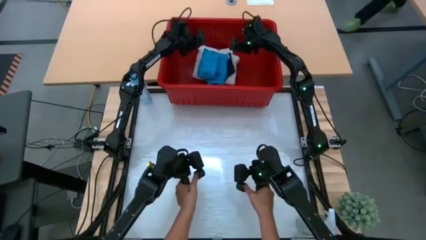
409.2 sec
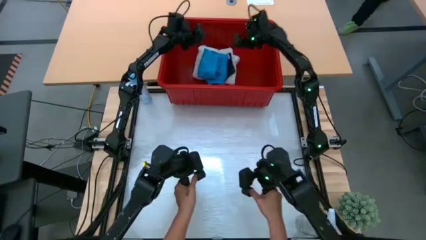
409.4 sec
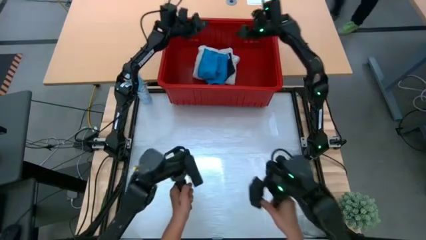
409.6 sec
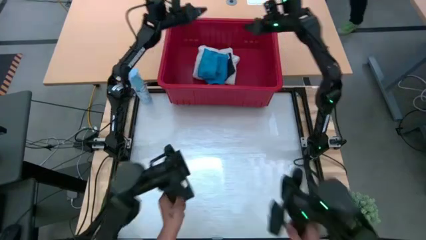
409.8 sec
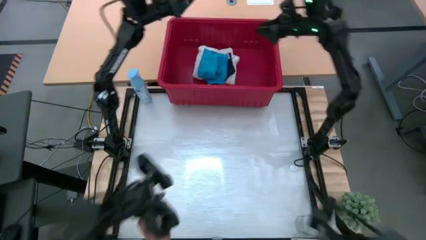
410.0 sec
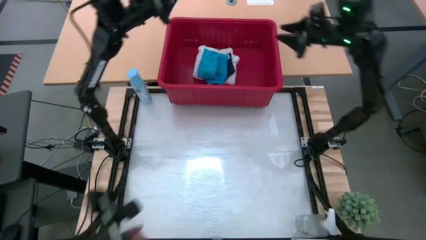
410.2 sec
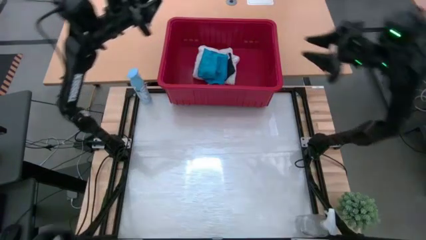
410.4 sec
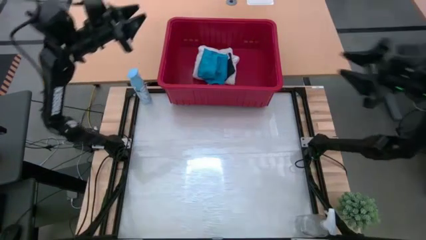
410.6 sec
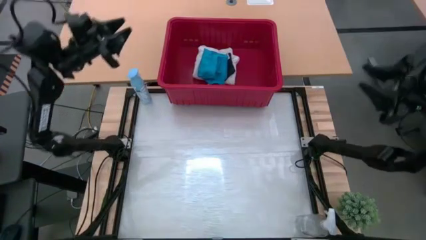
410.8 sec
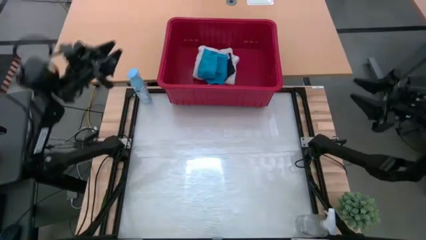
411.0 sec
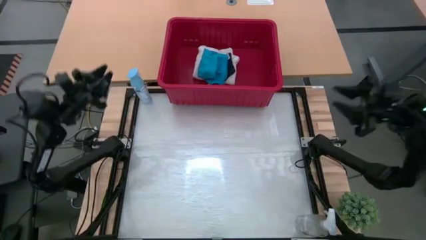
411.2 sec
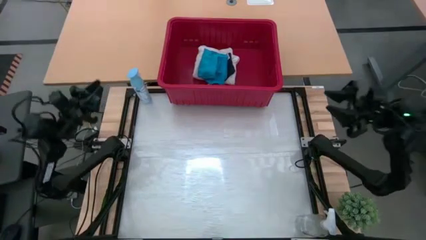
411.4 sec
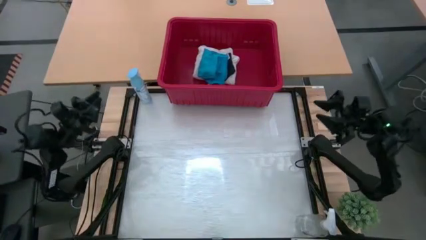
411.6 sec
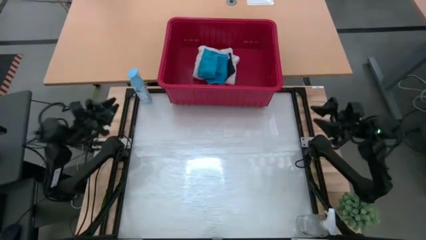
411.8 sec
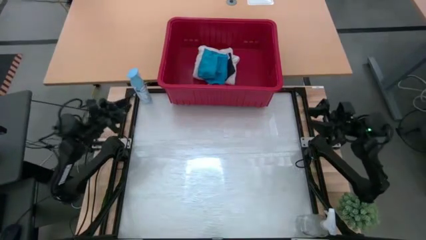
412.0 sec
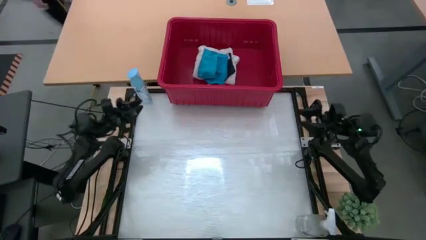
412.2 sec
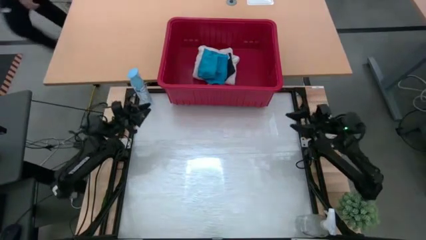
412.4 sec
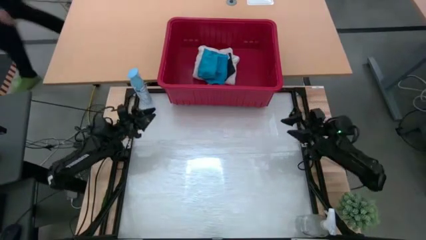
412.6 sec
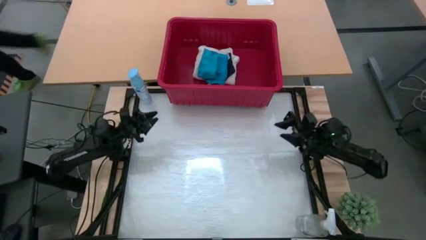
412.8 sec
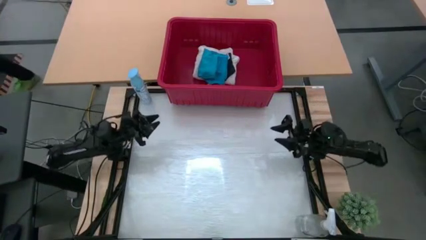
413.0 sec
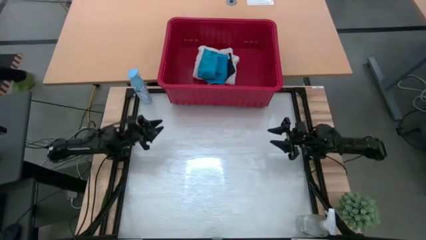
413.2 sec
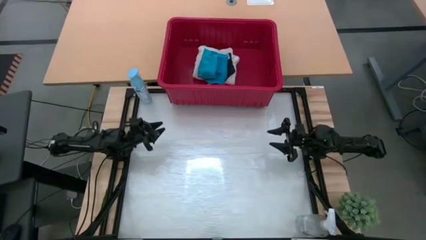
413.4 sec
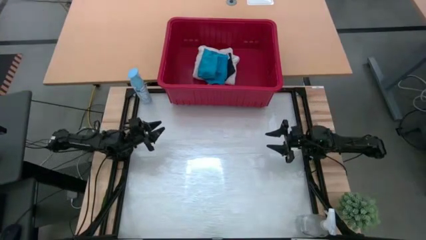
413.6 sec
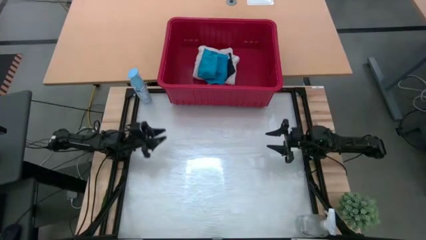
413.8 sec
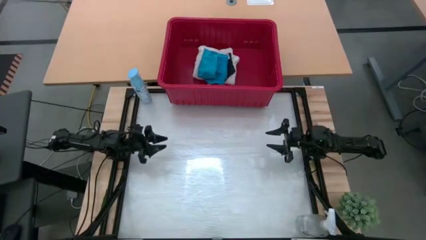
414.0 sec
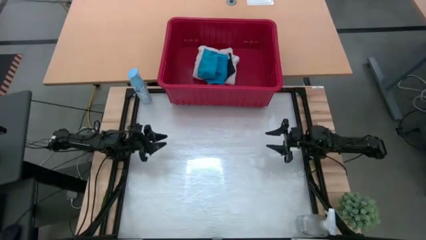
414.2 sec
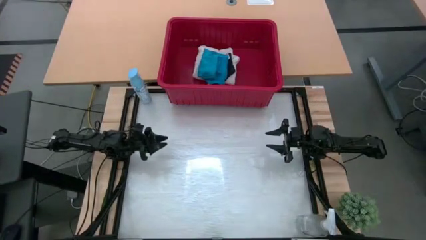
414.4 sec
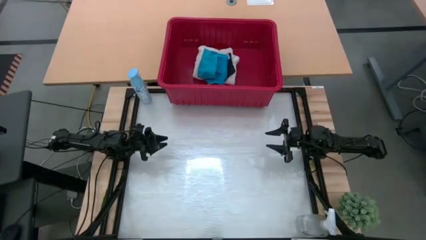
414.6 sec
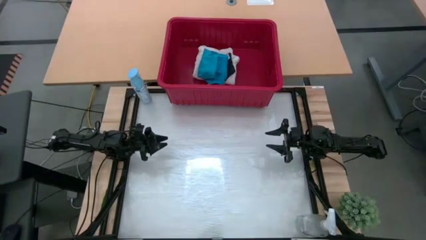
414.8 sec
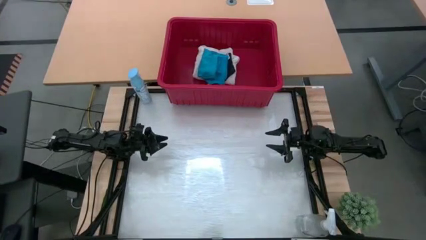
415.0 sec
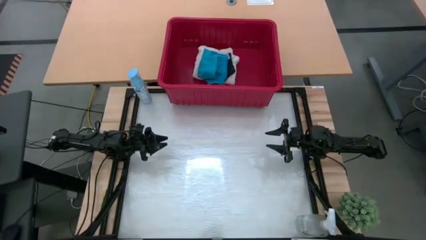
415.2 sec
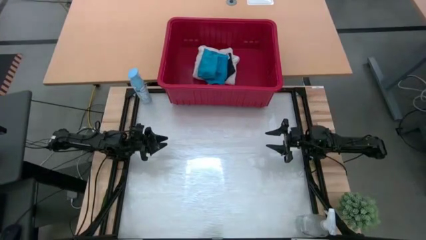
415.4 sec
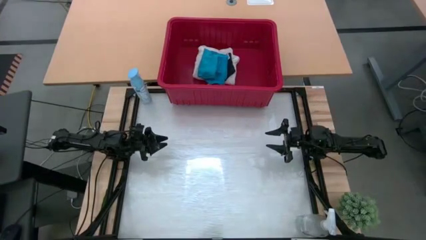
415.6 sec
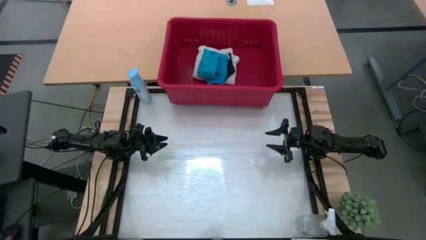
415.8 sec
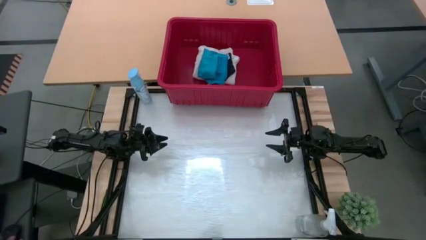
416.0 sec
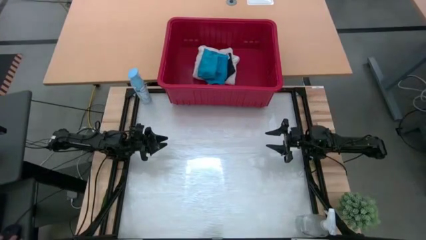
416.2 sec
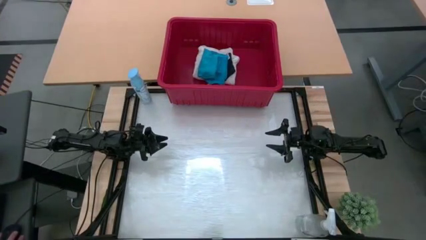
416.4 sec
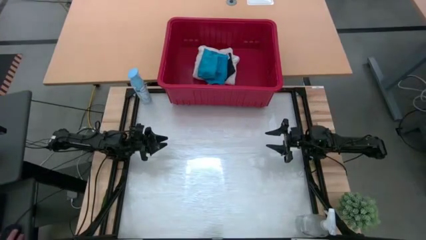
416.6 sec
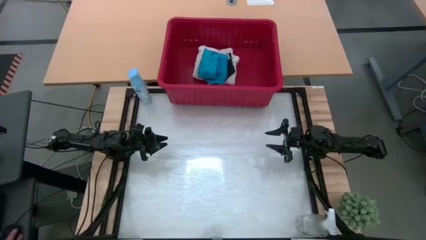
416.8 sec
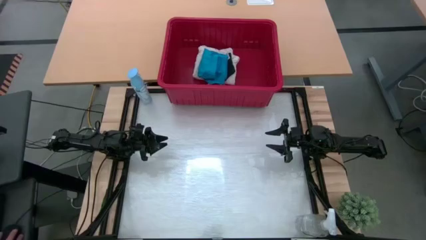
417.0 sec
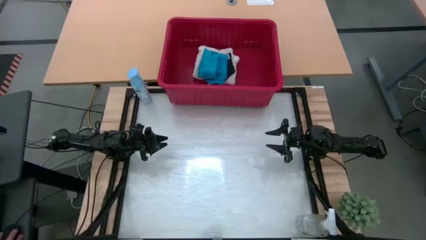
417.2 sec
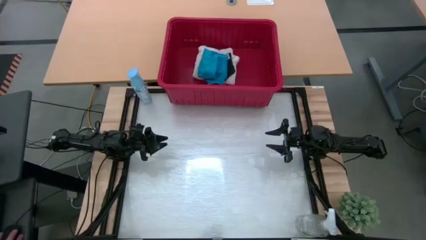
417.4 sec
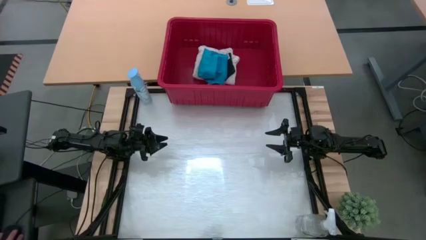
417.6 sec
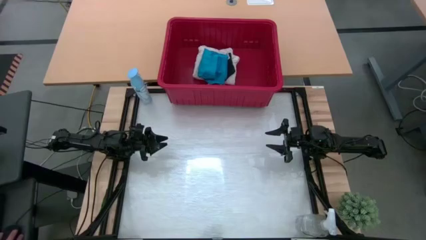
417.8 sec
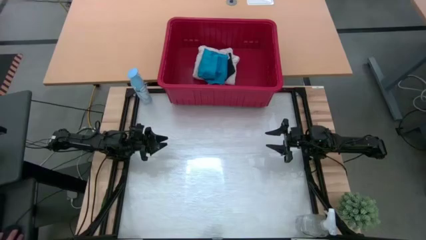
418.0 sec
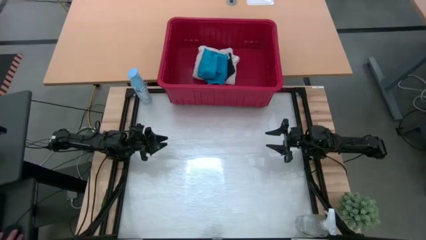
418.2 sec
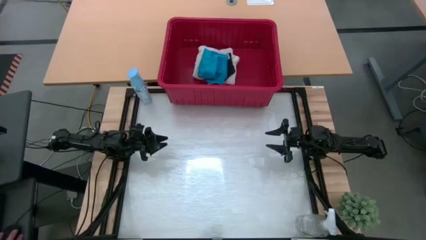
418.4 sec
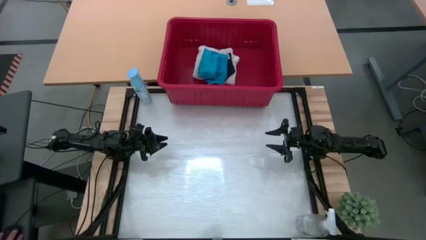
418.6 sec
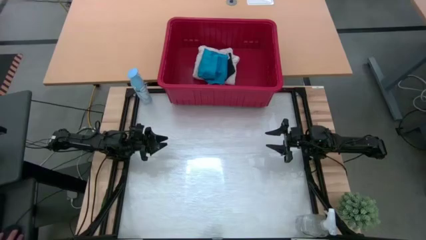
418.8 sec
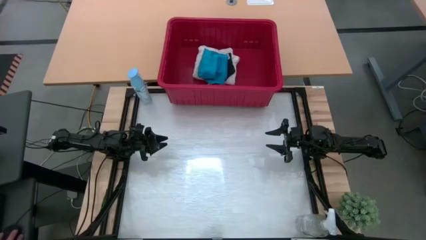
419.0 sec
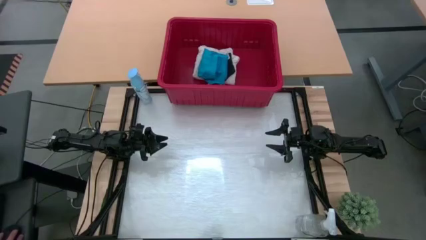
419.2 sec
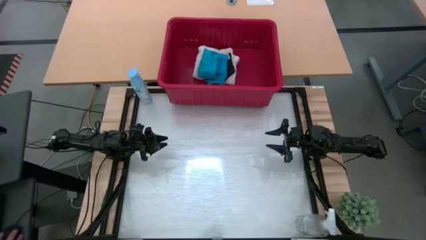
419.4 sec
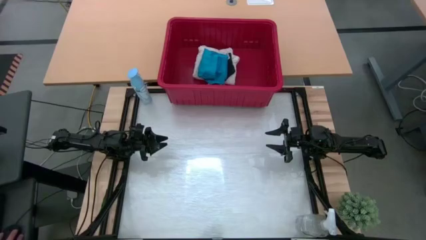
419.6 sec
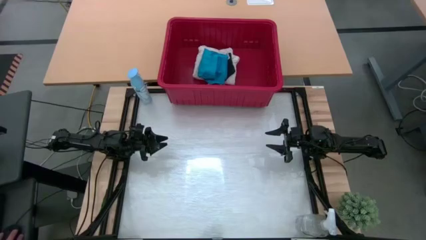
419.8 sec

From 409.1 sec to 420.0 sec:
Task: Fold Laundry from Bin
Return to Home Position
